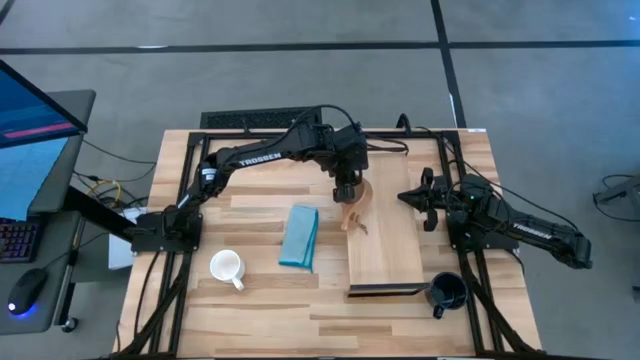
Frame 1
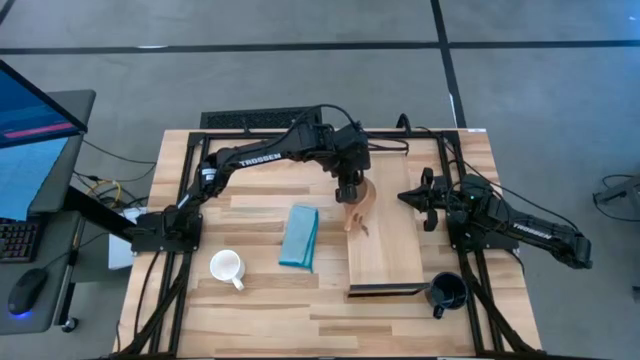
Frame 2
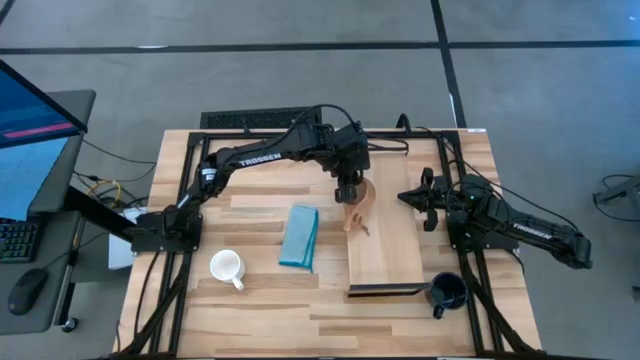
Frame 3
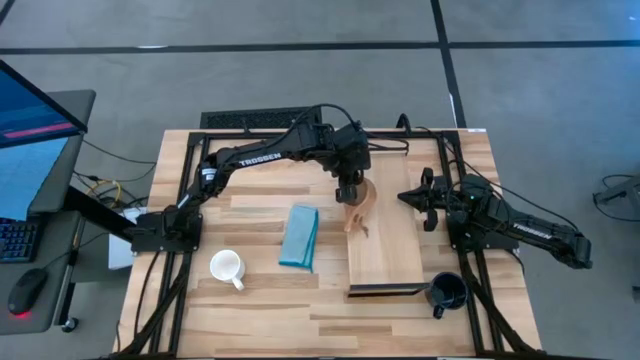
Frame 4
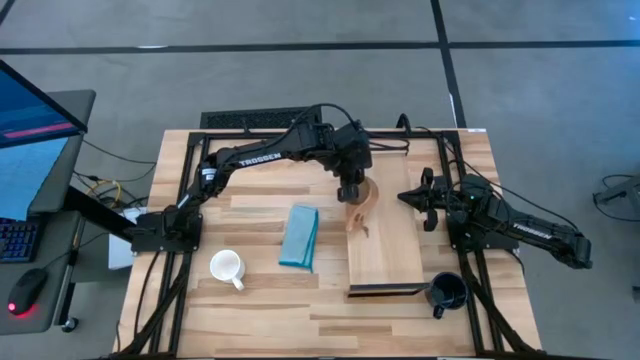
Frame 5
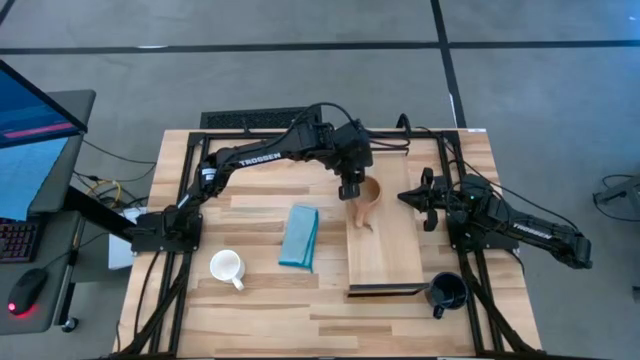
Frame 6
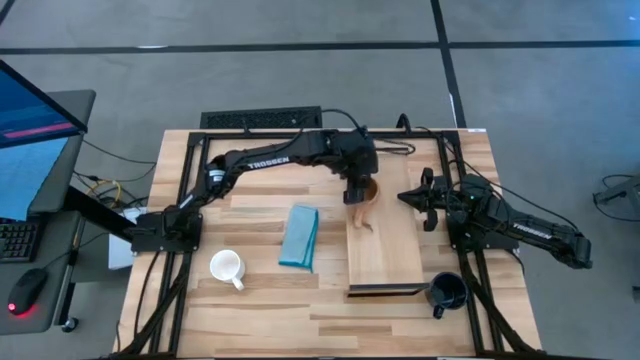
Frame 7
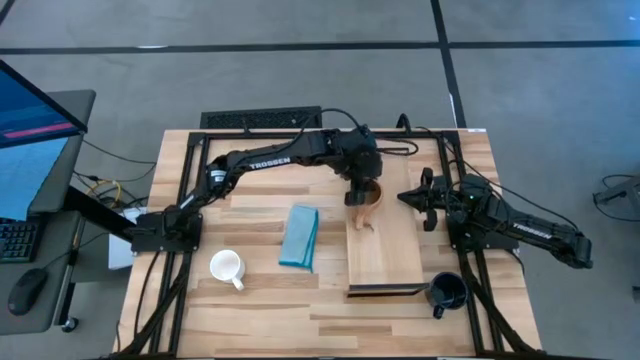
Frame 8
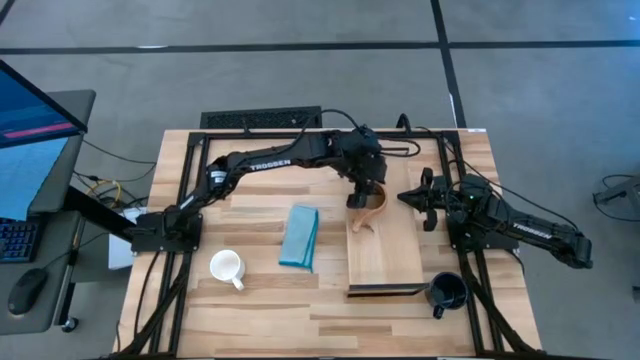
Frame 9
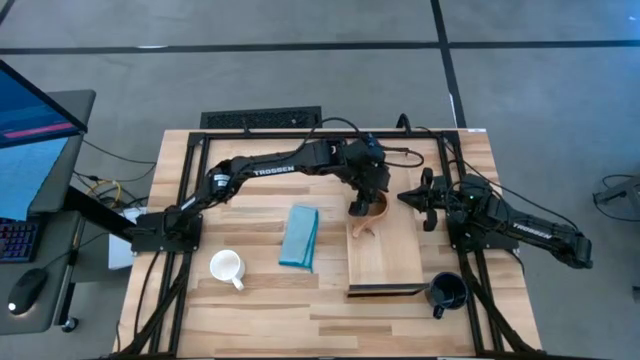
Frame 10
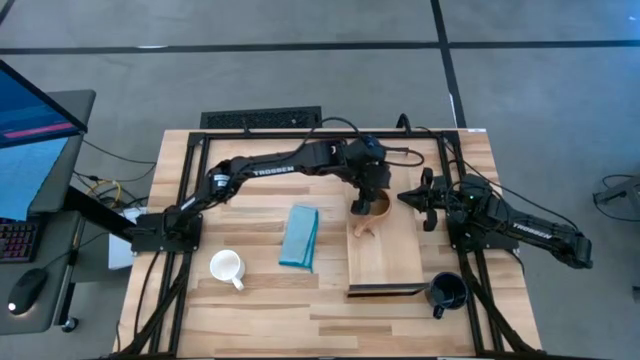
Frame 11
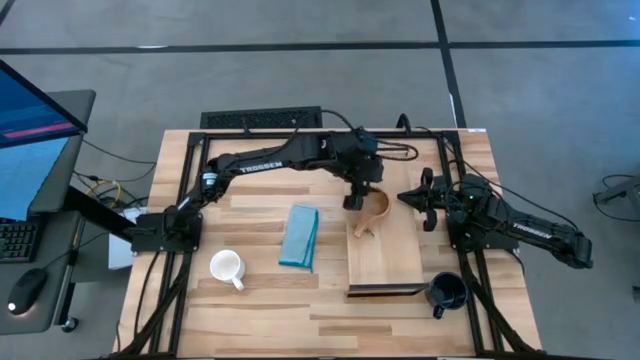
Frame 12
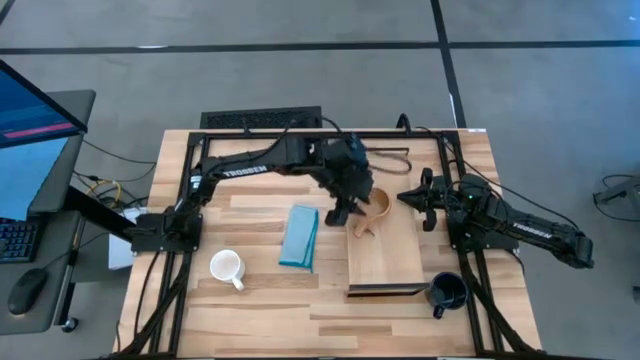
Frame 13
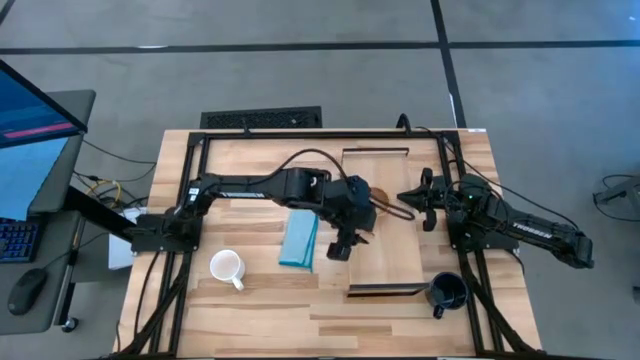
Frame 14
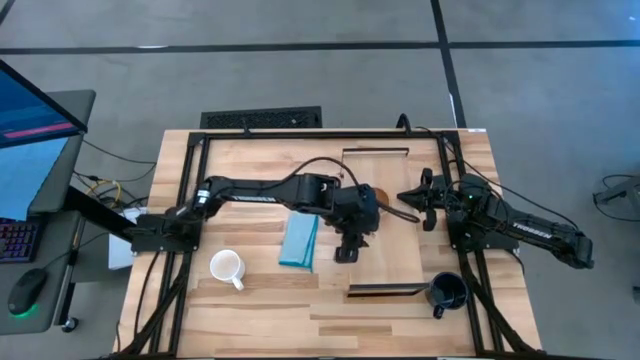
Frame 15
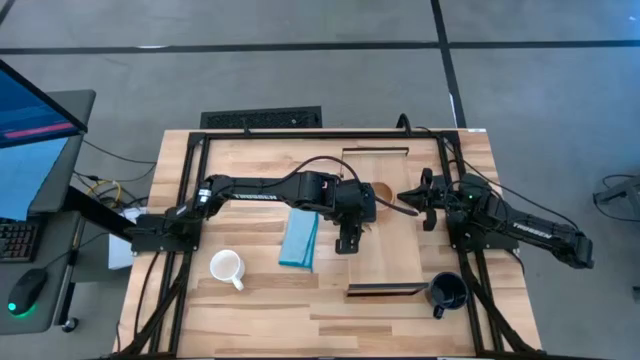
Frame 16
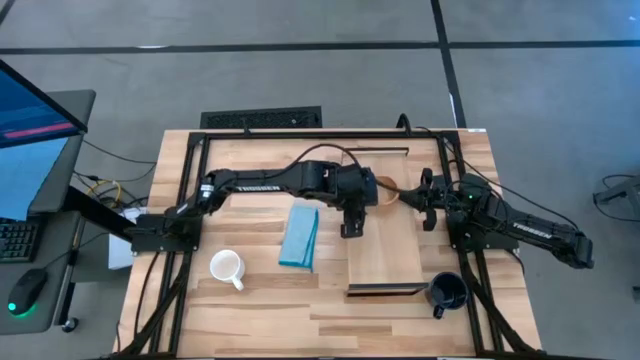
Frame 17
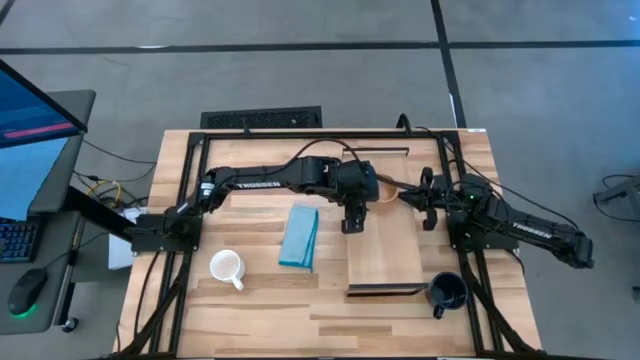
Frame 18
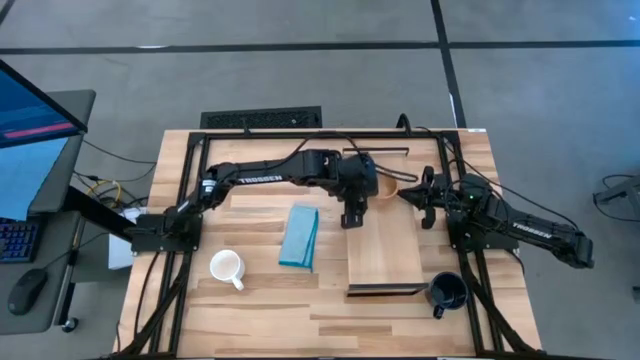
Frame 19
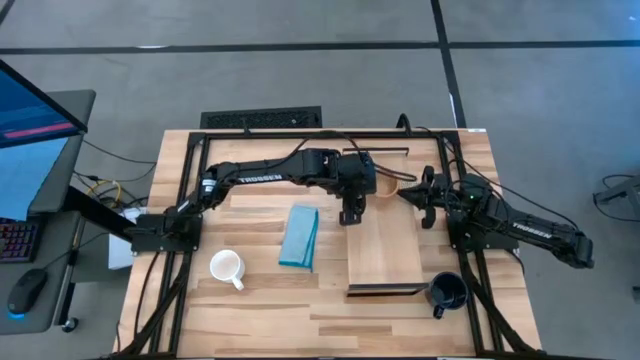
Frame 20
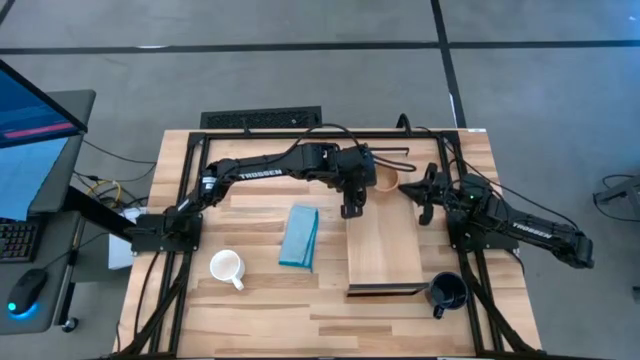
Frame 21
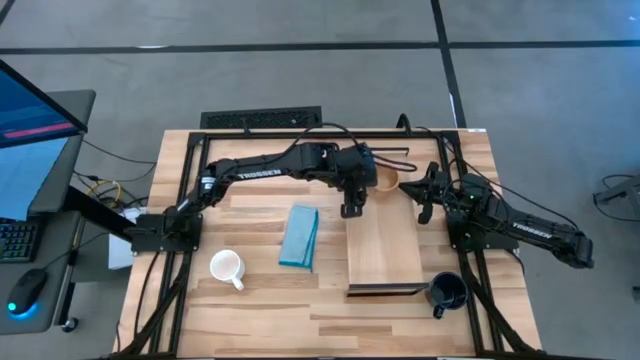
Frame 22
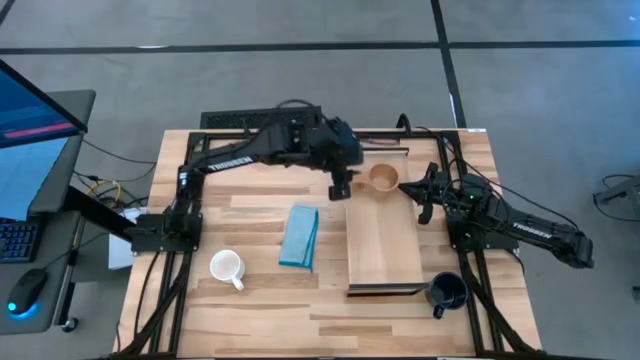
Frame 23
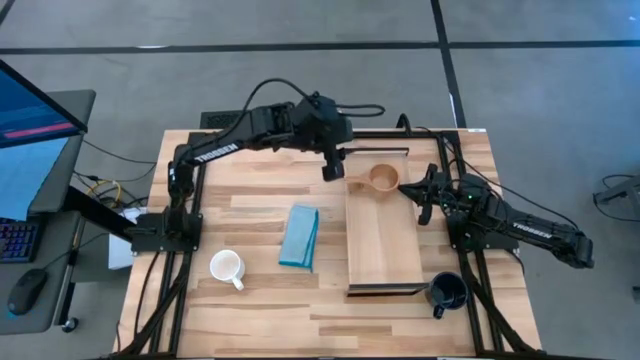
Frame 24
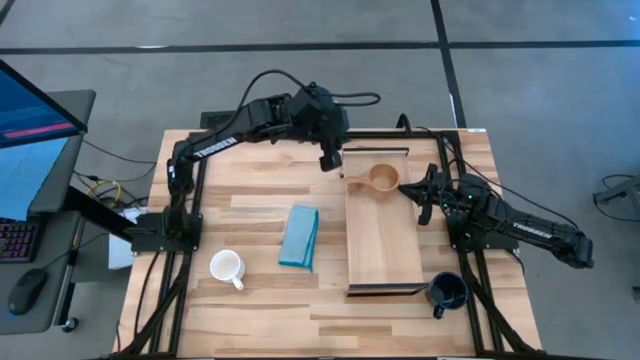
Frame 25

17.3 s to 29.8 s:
Task: Stack small to large cups/mugs on shelf
Put the brown mug on the shelf
